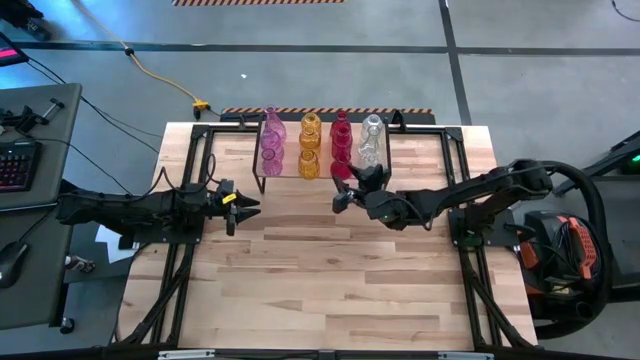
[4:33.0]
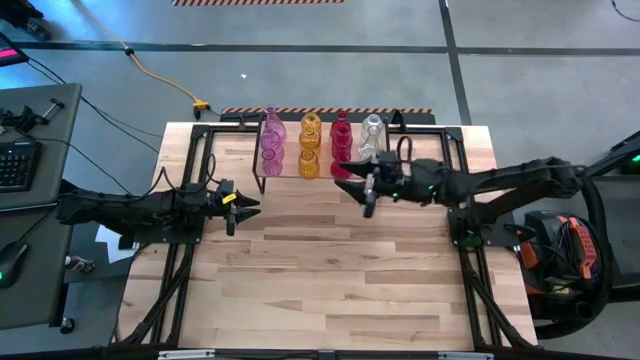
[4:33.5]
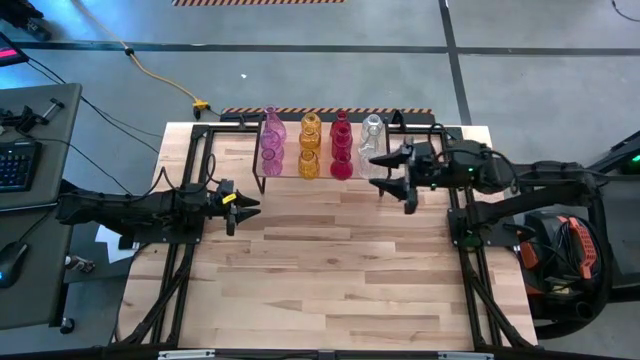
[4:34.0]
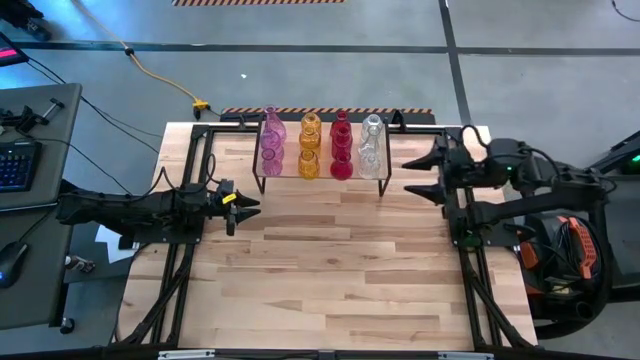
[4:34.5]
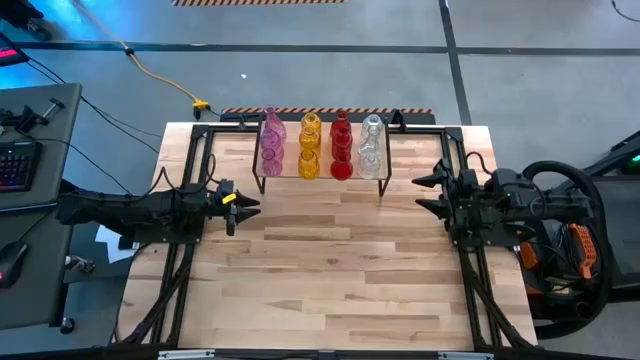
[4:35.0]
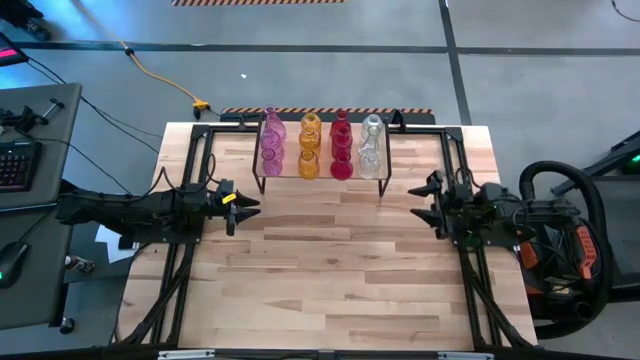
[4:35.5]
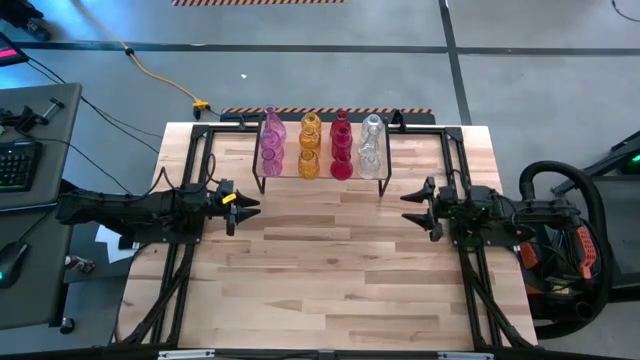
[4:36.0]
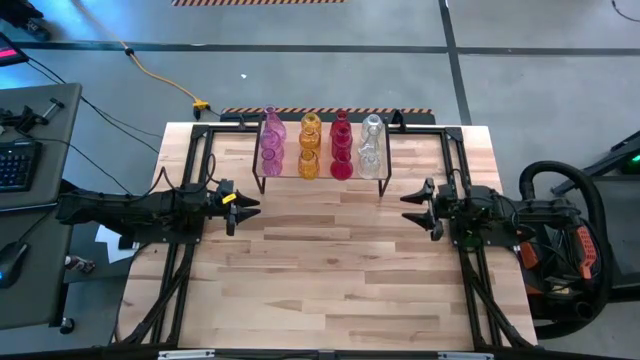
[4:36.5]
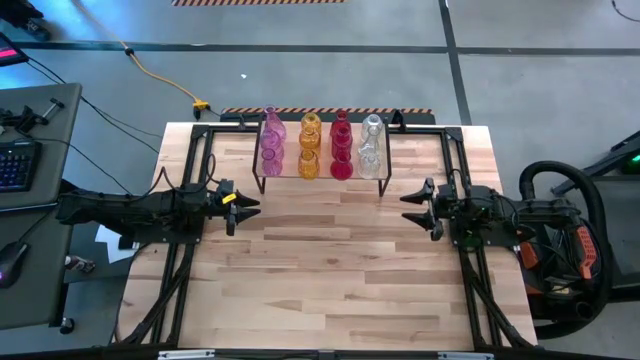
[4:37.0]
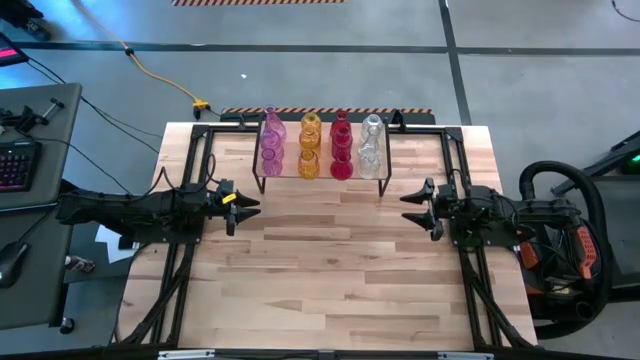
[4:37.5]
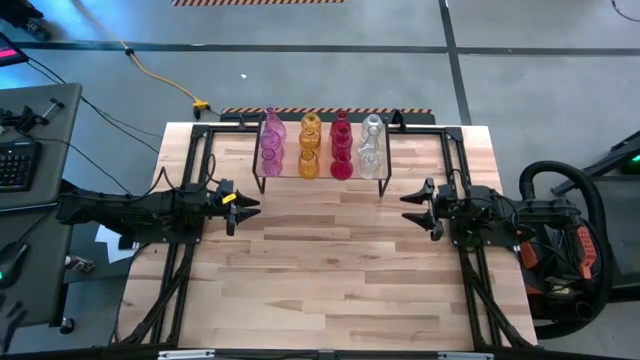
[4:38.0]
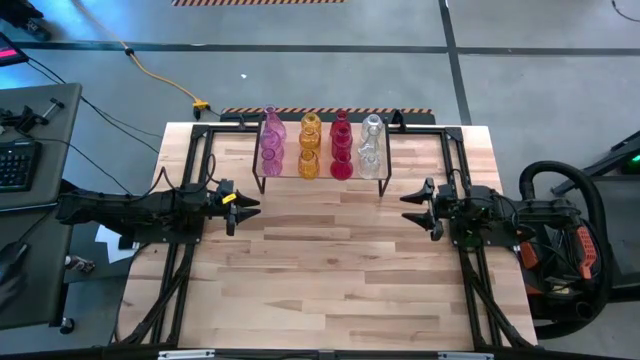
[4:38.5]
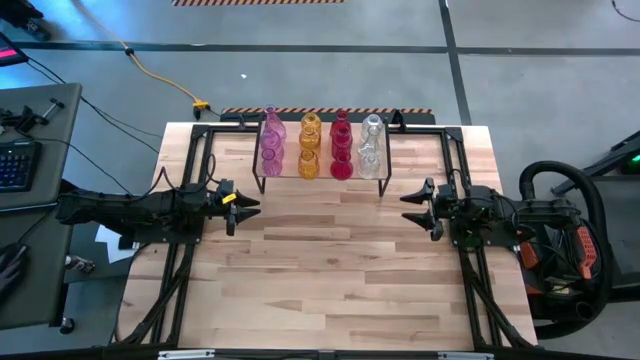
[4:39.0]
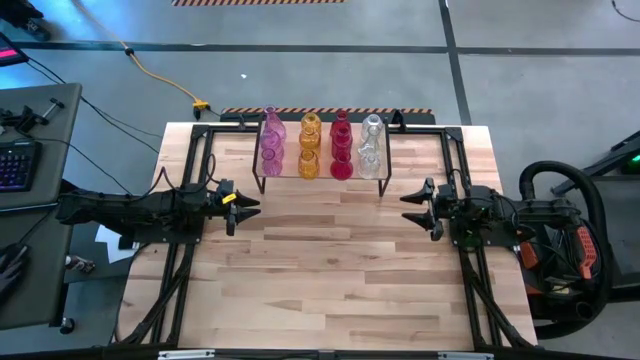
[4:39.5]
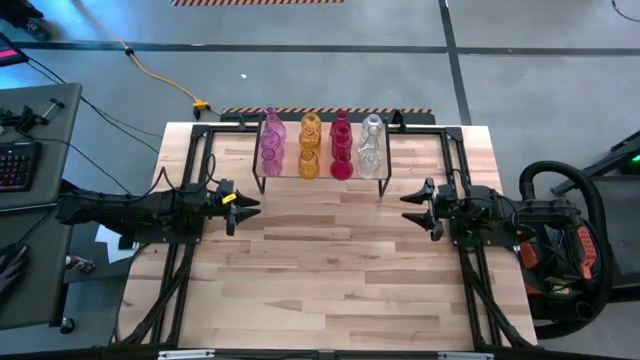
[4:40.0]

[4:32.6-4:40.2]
Task: sort vases onto shelf
Return to Home Position

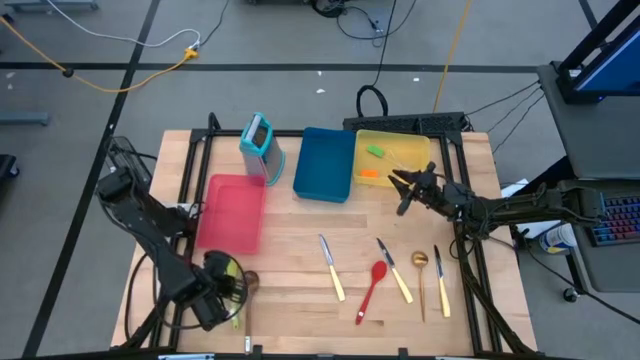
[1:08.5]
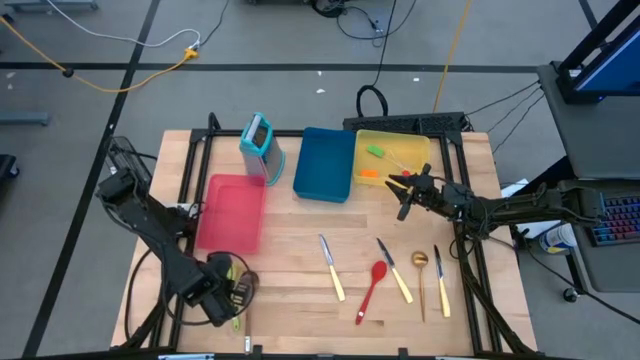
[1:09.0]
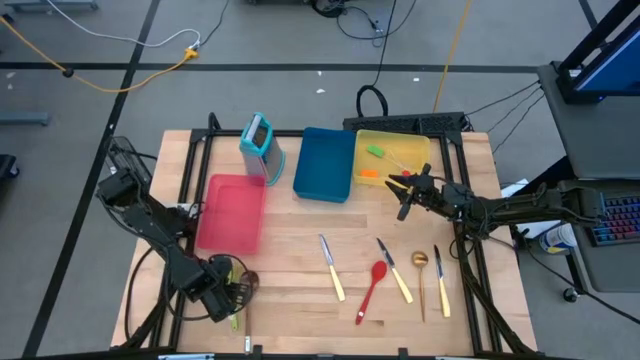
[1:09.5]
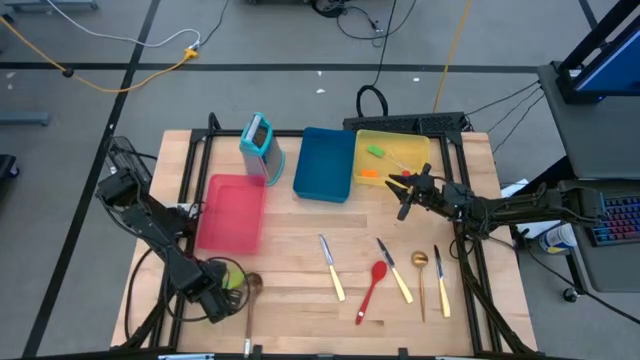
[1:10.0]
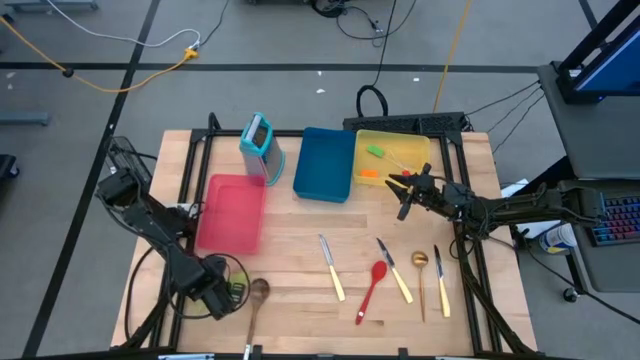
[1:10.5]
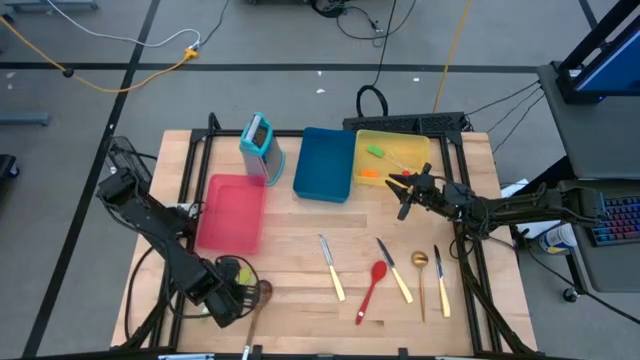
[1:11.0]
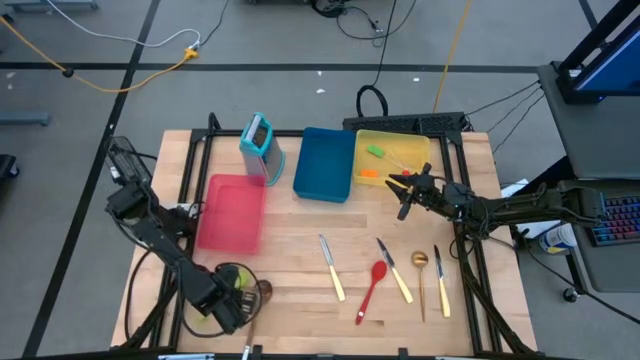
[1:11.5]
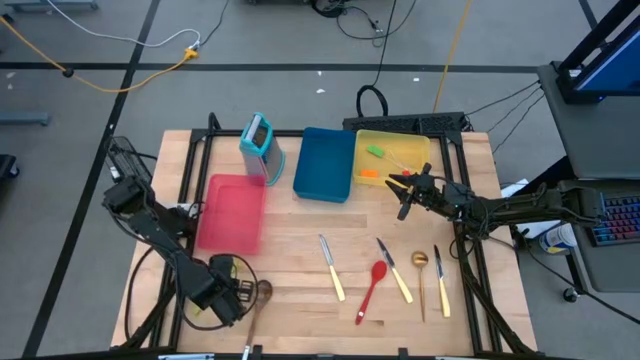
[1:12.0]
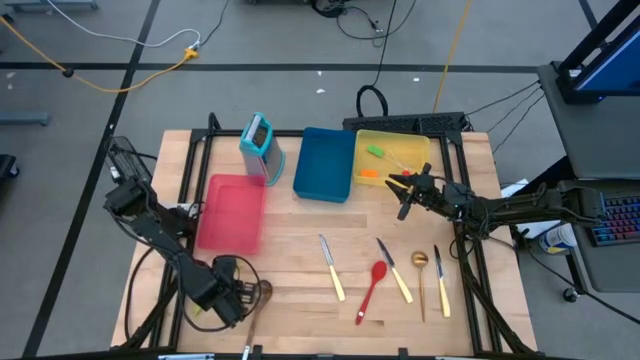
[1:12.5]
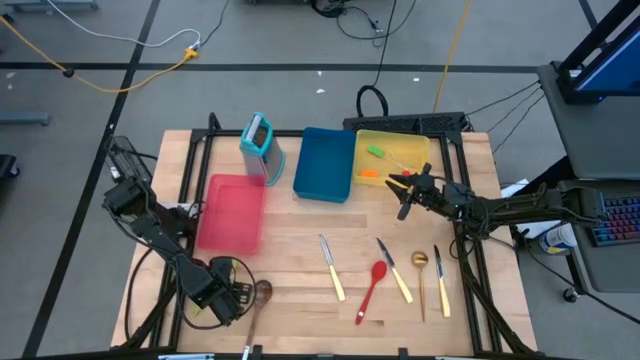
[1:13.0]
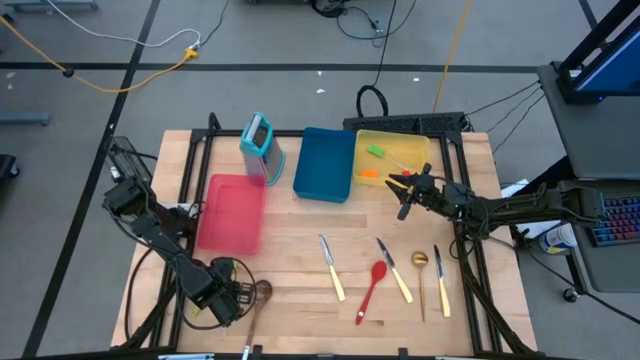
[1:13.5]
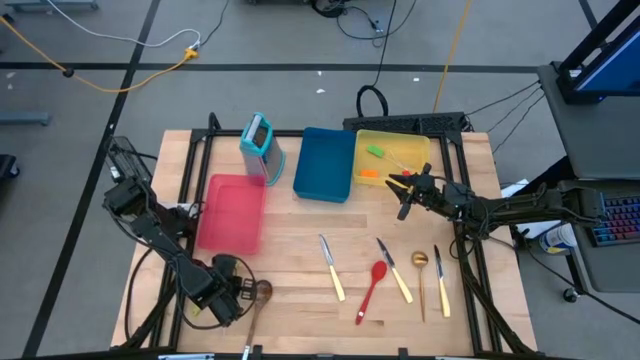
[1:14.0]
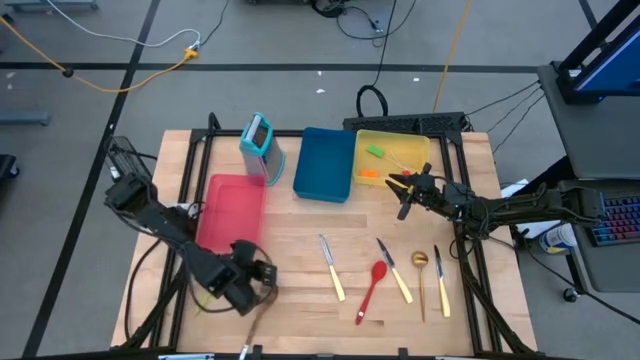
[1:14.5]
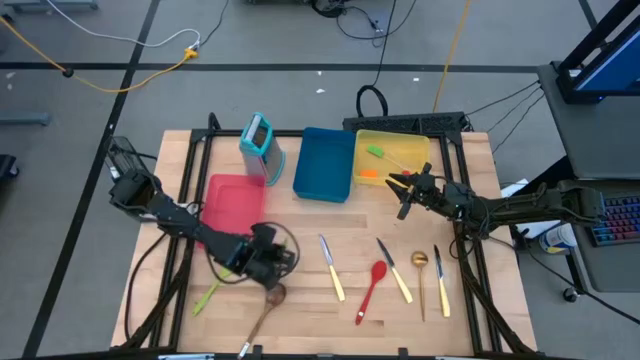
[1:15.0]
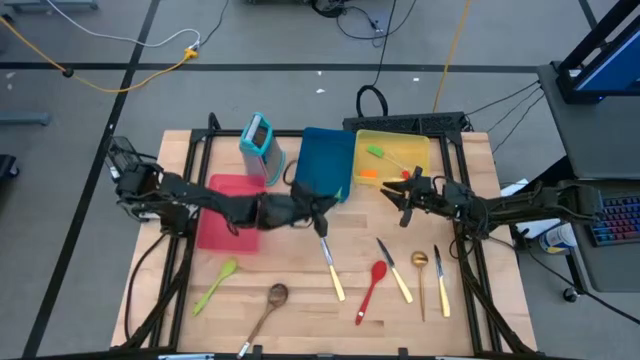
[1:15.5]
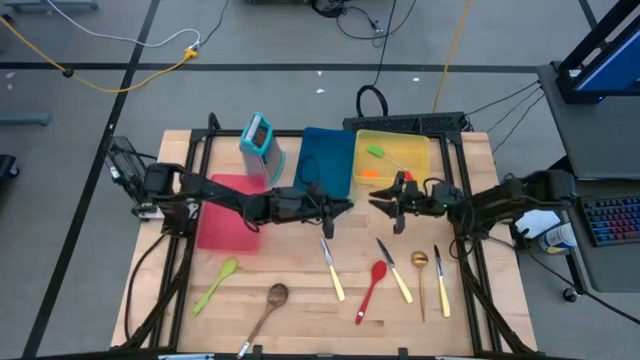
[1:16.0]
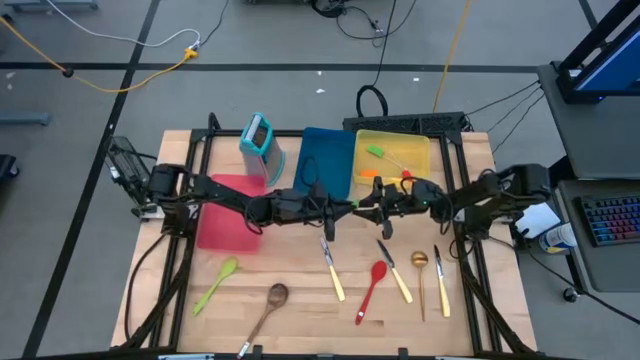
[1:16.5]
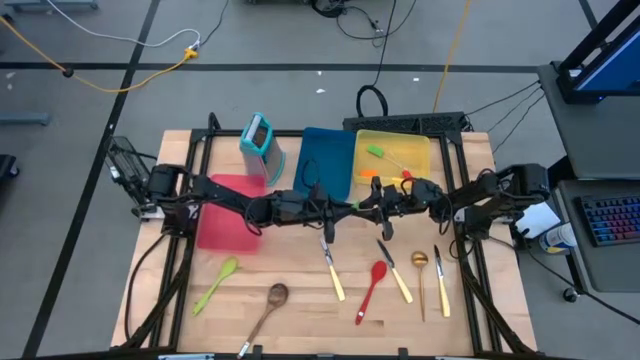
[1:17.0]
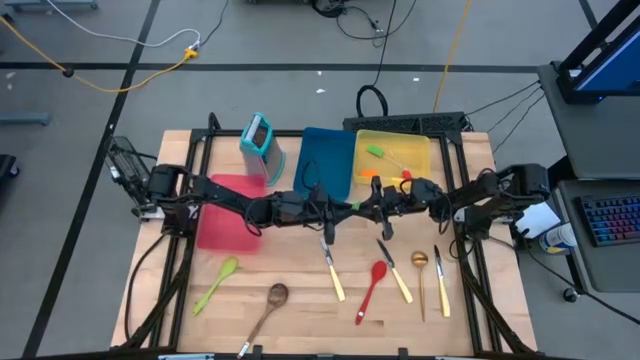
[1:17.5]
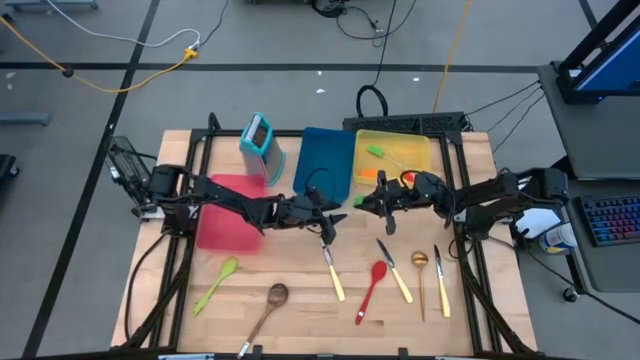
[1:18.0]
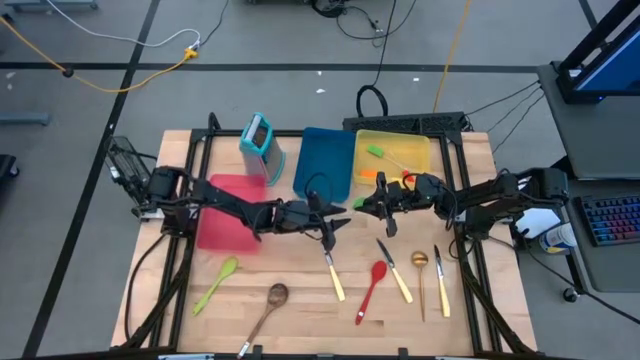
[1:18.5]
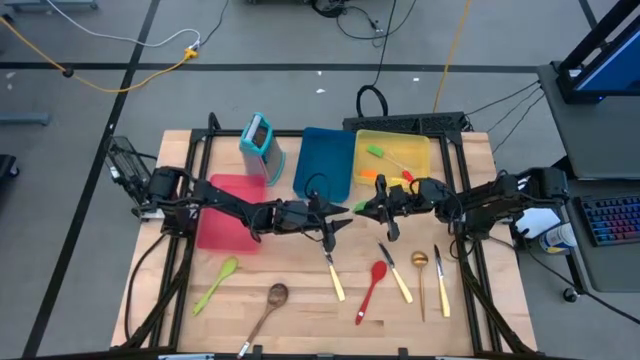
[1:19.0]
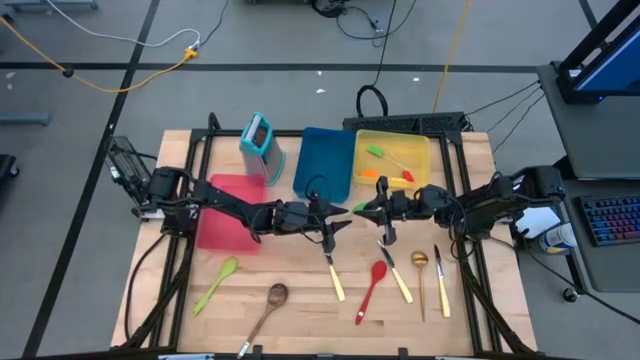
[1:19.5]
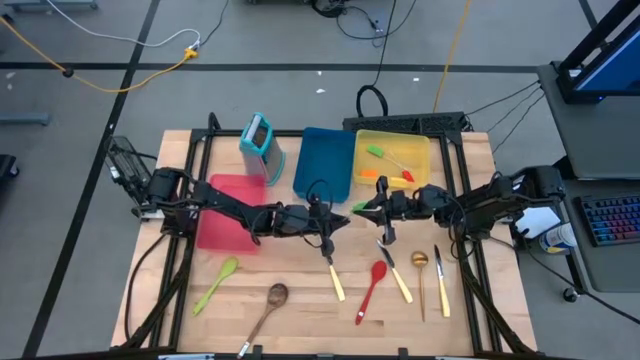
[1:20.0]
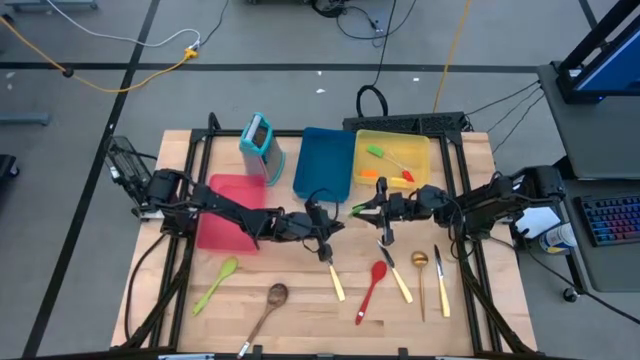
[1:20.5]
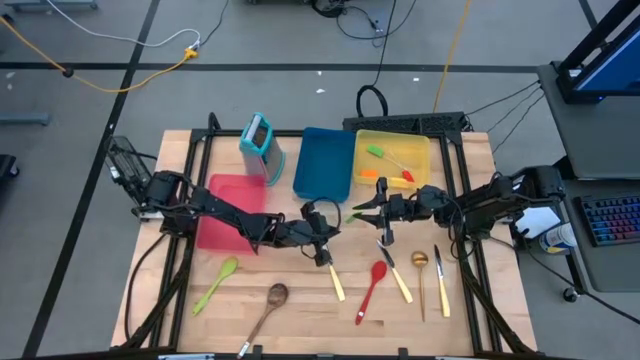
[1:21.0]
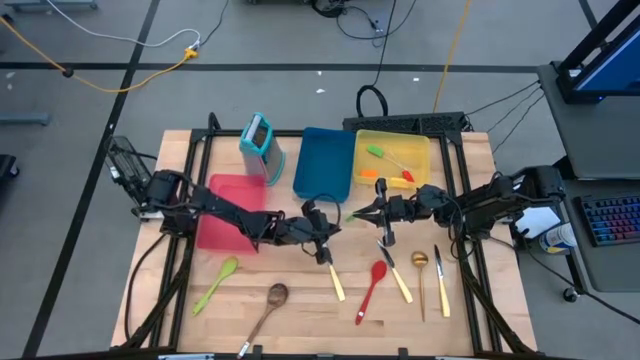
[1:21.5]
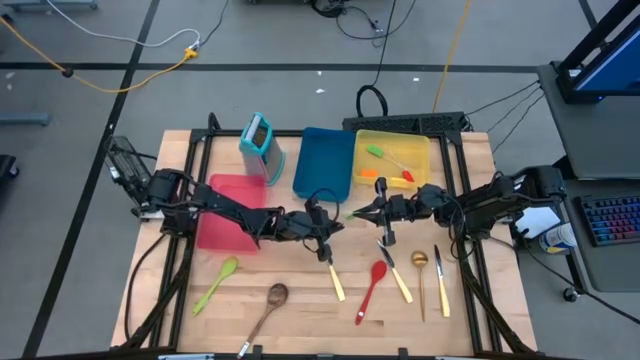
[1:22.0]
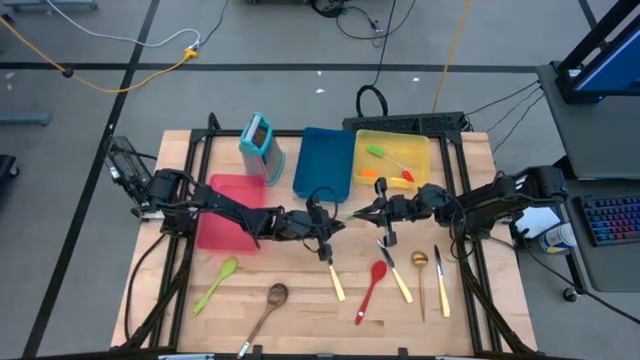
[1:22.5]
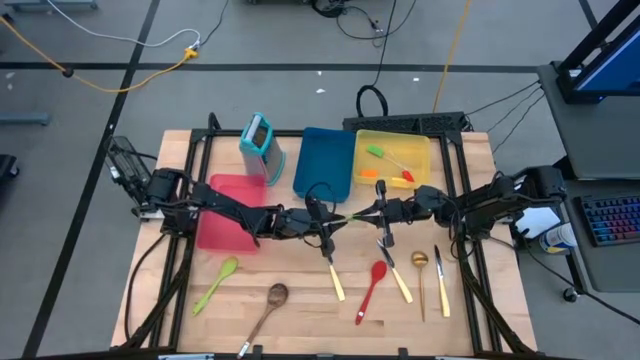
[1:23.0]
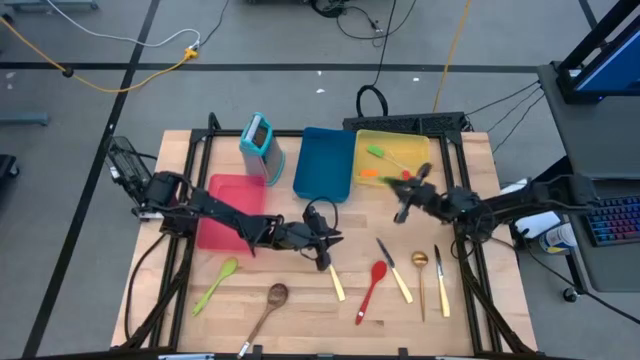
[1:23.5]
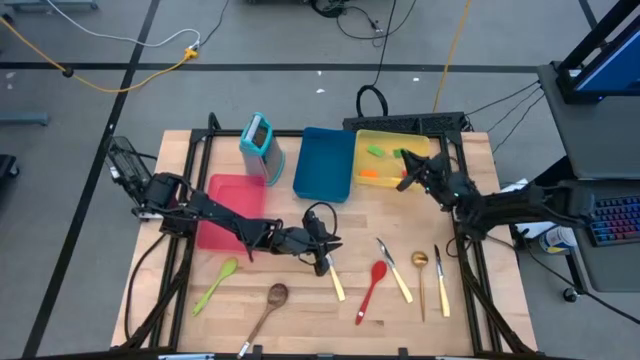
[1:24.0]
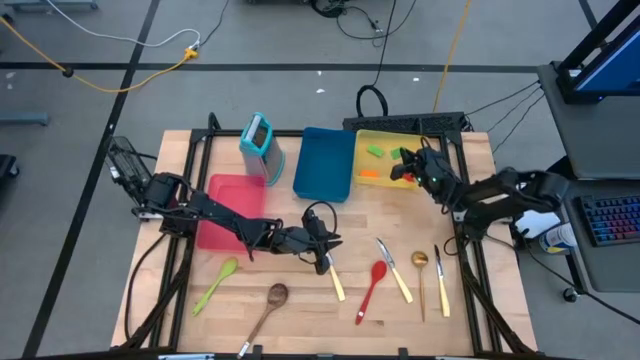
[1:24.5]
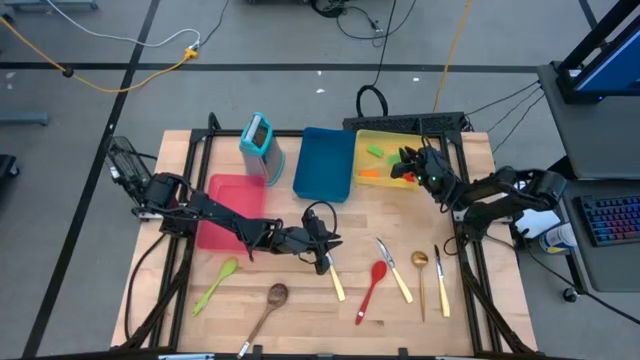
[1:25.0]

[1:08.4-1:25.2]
Task: Pick & Place Kitchen Items
Put the green spatula into the yellow bin
